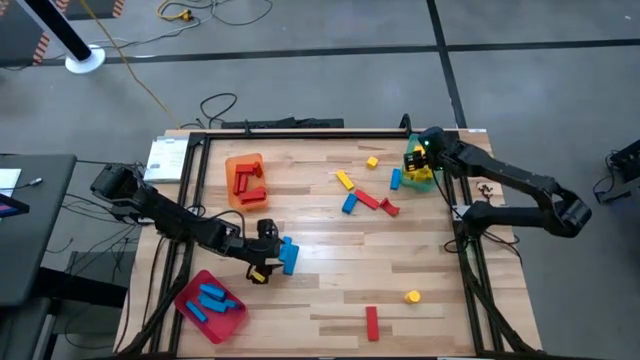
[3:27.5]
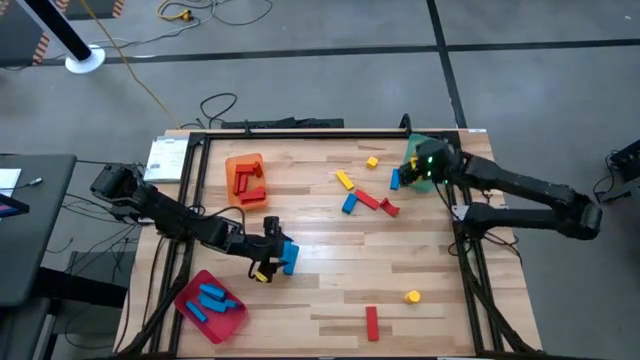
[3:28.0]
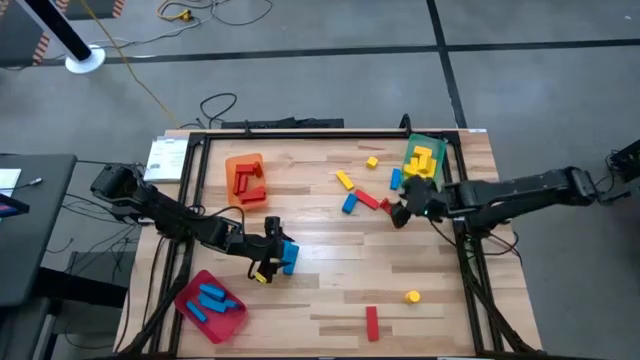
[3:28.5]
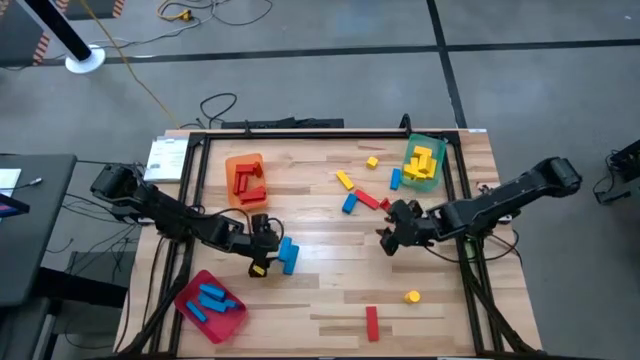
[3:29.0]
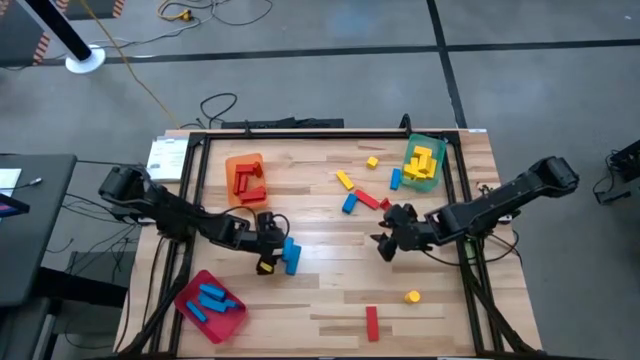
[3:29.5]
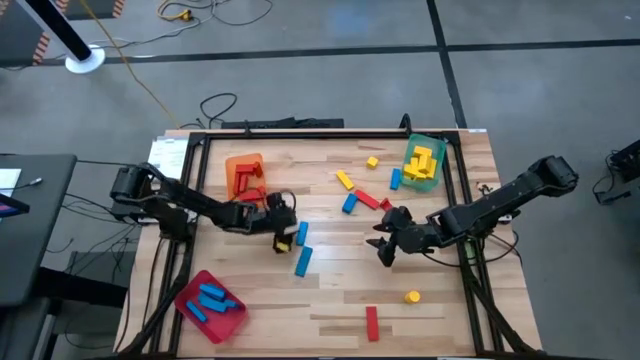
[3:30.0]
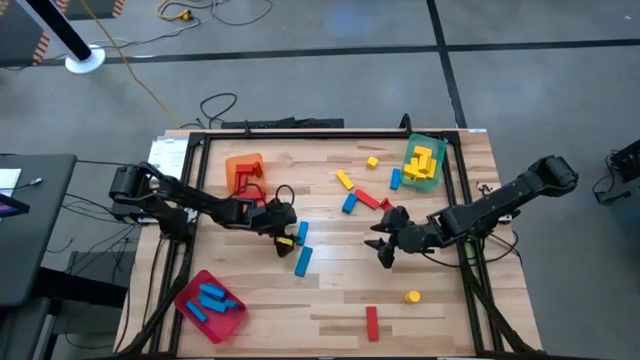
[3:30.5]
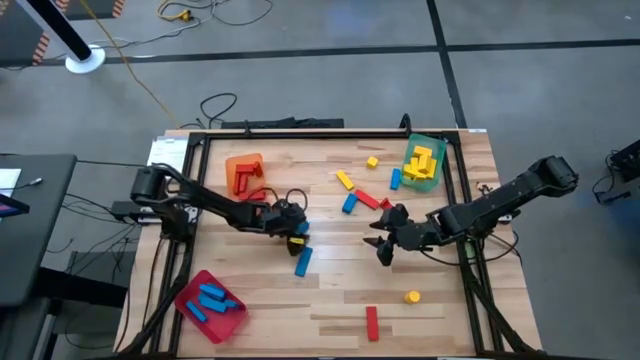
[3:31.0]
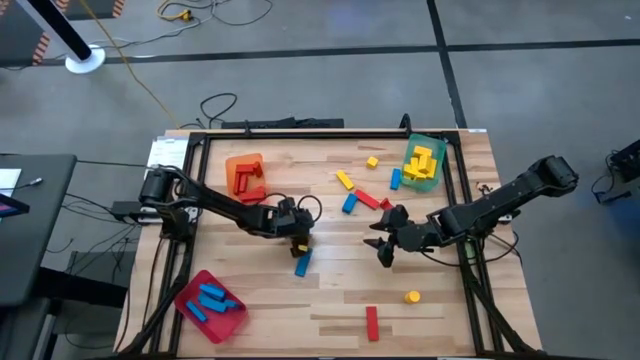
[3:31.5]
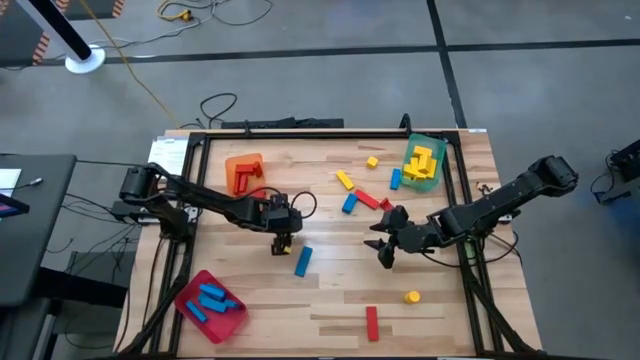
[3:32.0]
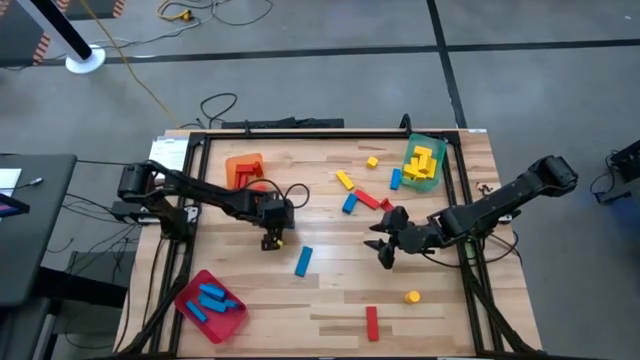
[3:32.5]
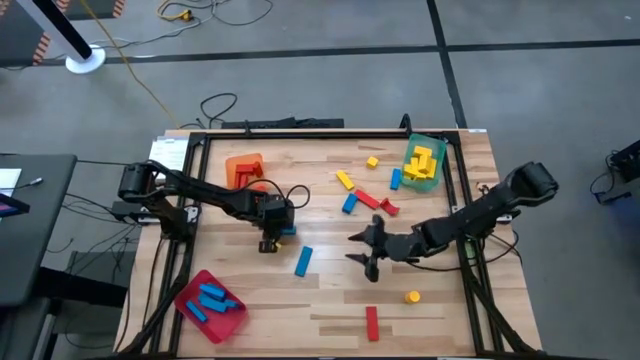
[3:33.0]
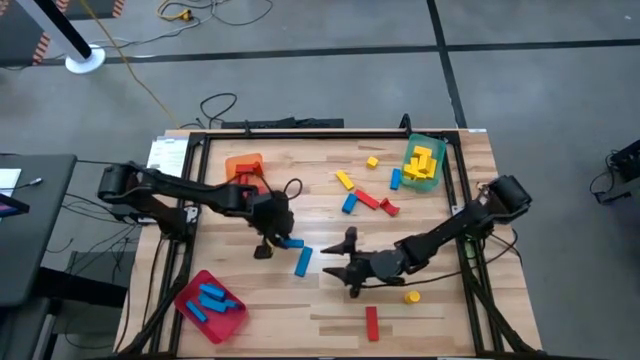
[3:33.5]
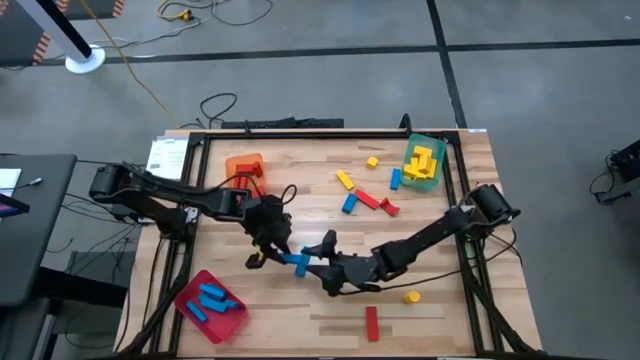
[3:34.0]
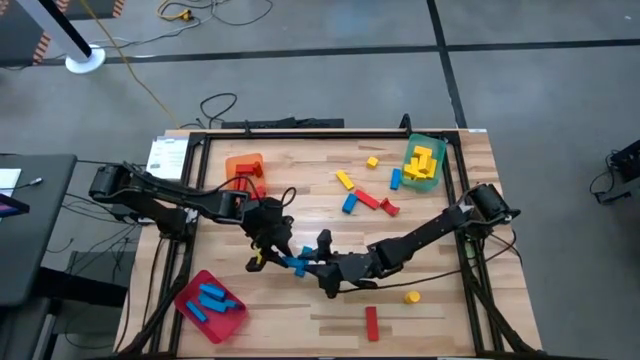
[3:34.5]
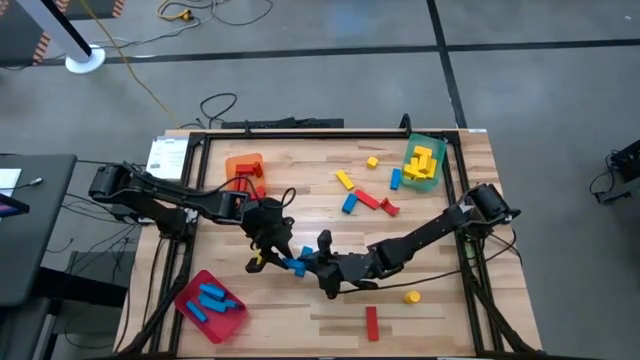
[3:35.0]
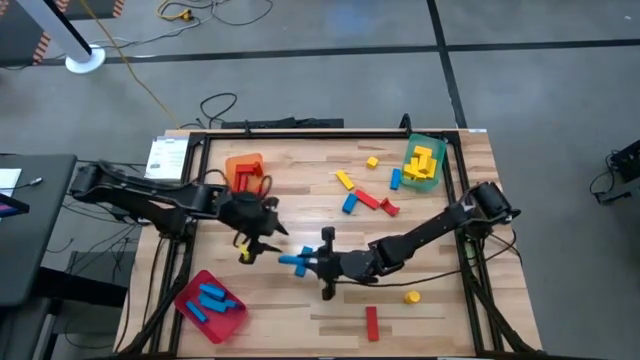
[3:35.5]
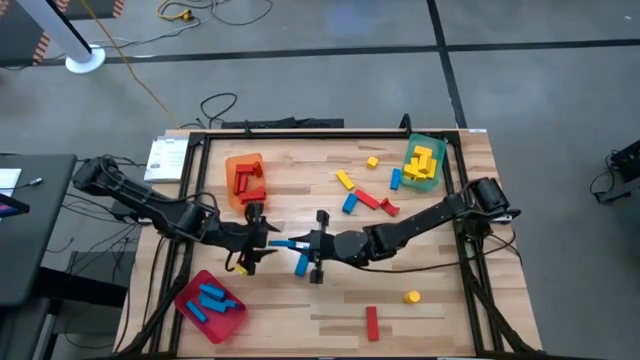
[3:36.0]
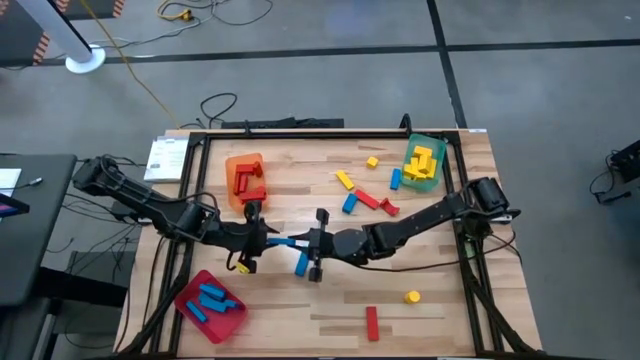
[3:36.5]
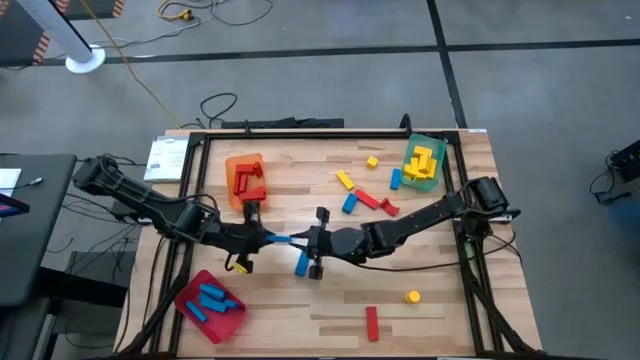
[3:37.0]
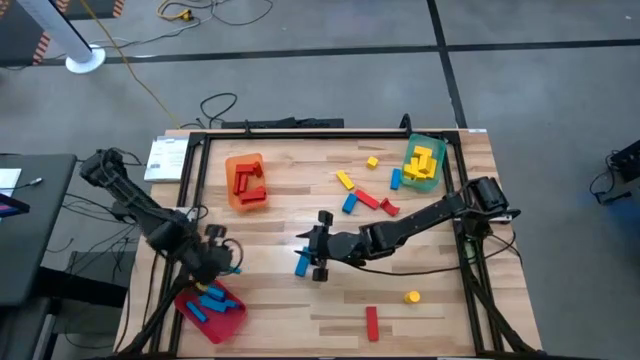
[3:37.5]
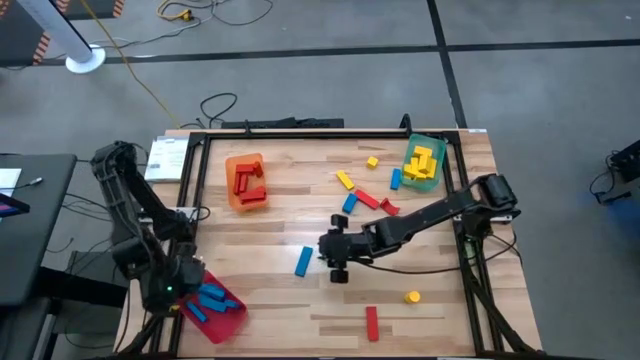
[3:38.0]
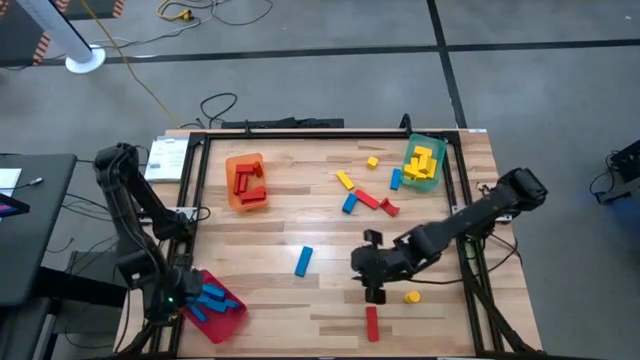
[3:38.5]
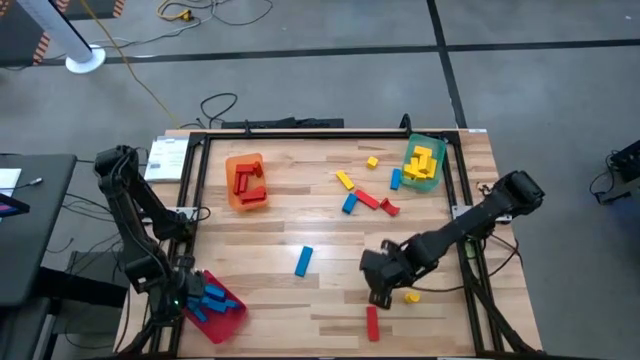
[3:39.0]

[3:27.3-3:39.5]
Task: Sort blocks
Put the blue wooden block into the red bin

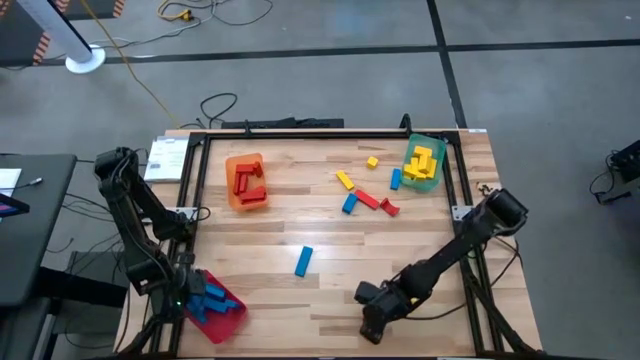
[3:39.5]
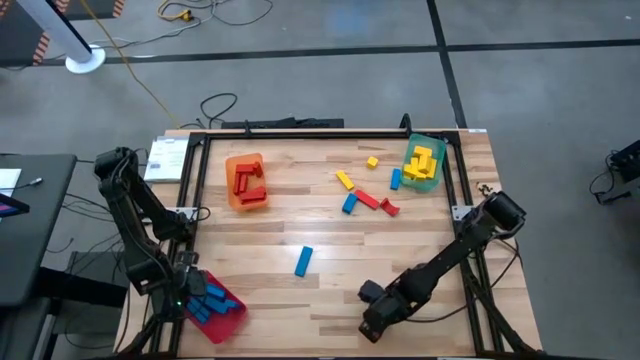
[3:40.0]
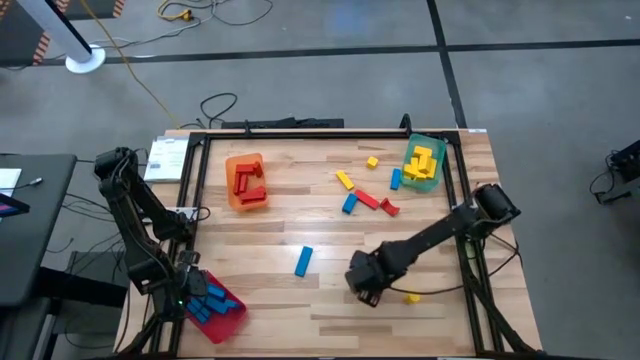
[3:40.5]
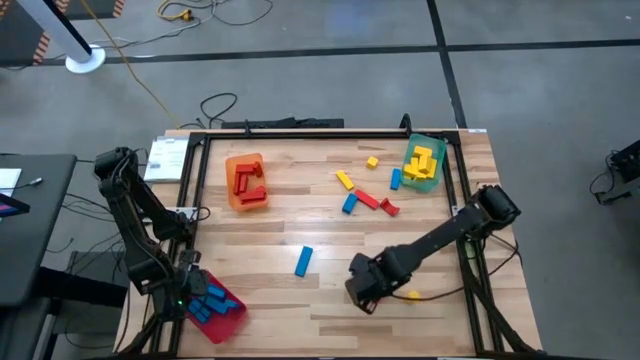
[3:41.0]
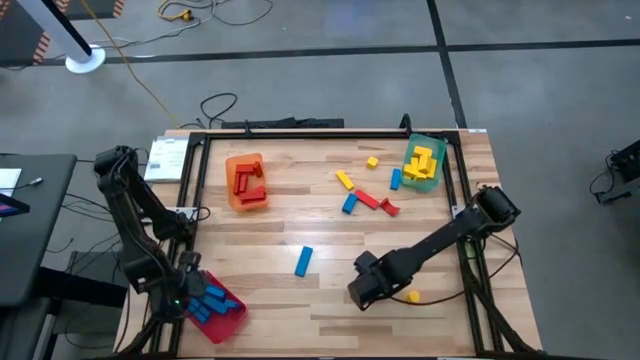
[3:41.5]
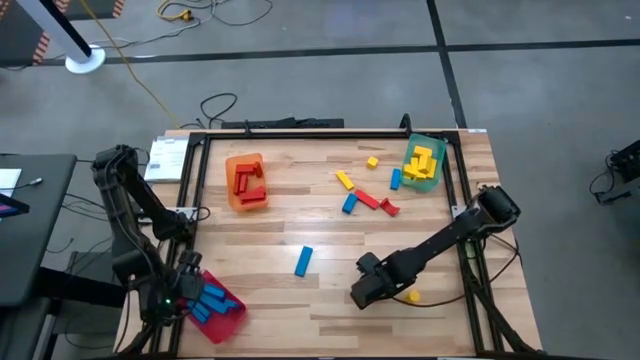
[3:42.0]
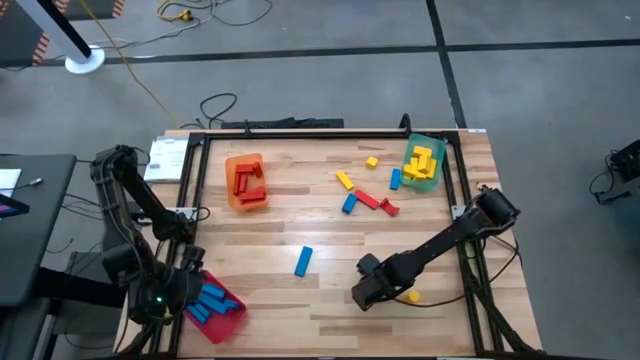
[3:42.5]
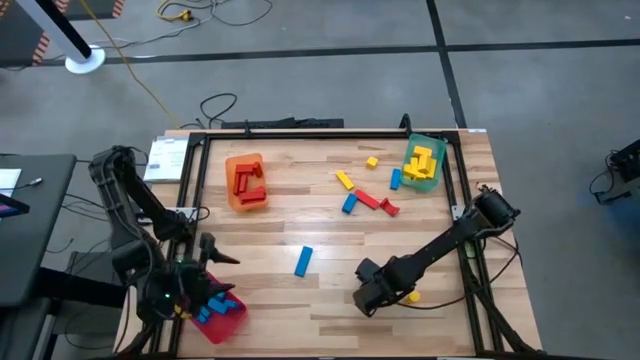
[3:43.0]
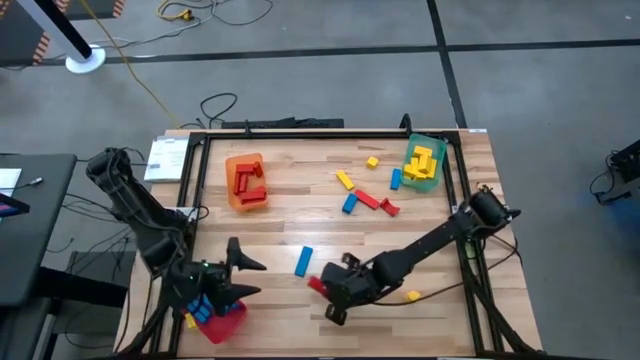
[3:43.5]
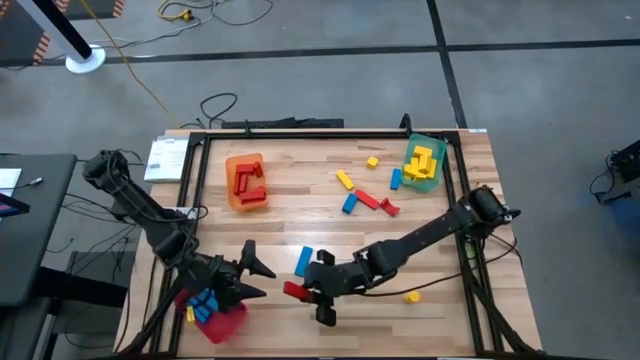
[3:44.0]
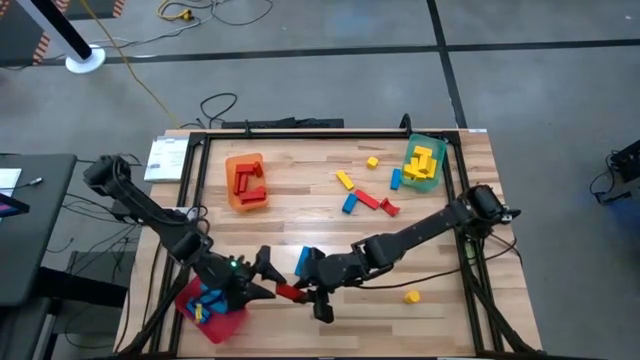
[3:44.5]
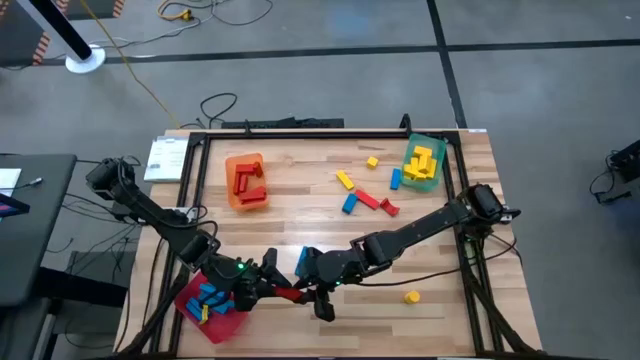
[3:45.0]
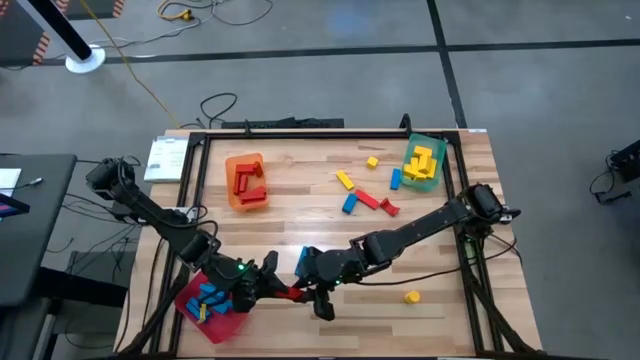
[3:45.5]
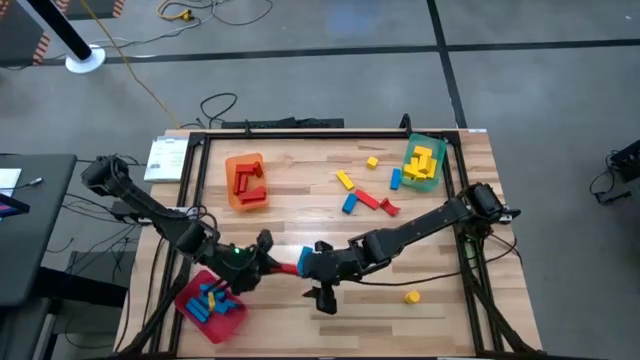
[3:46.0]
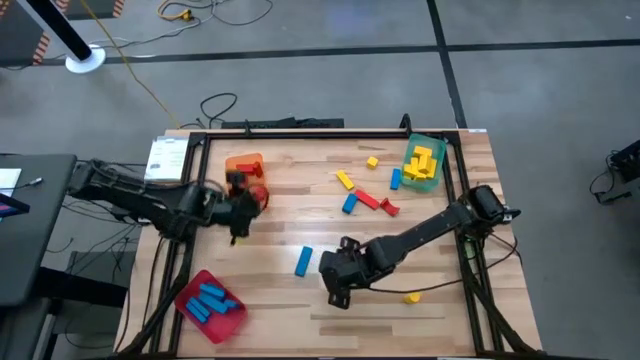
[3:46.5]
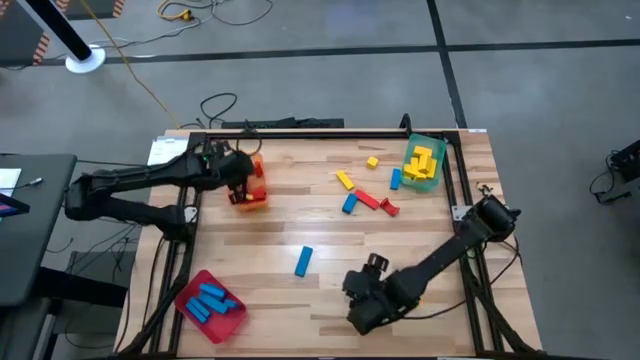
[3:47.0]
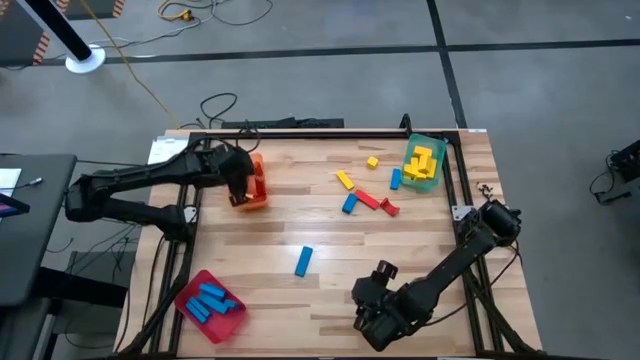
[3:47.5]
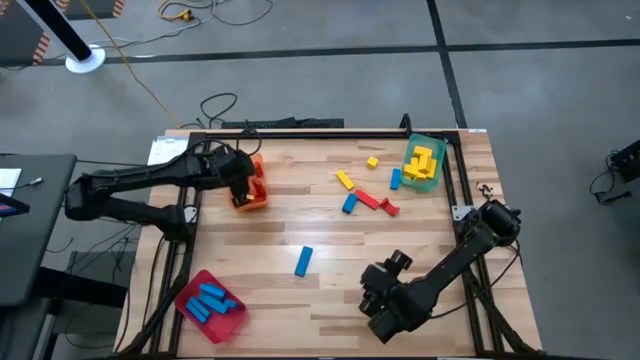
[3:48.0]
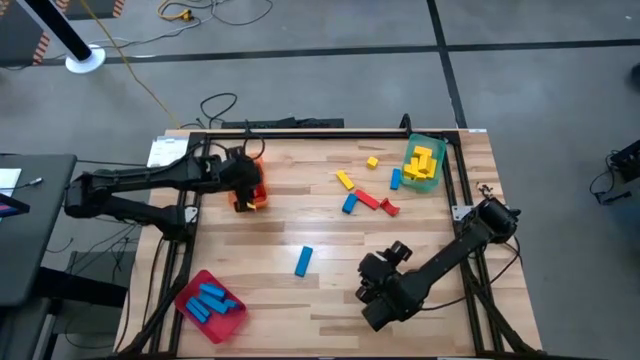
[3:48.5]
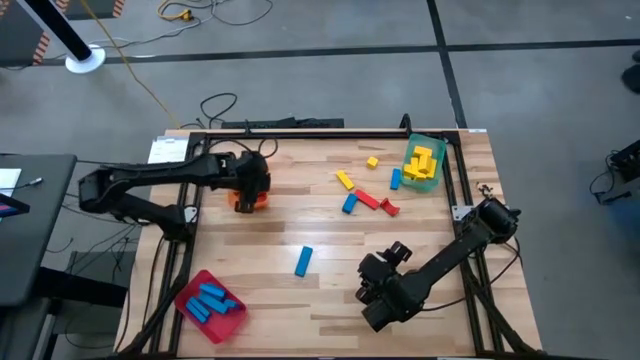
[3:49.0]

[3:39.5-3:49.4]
Put the red wooden block into the orange bin
